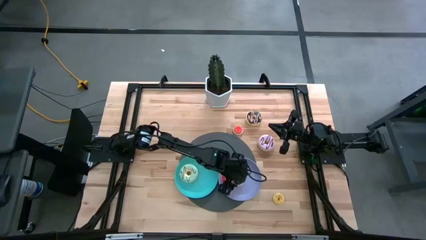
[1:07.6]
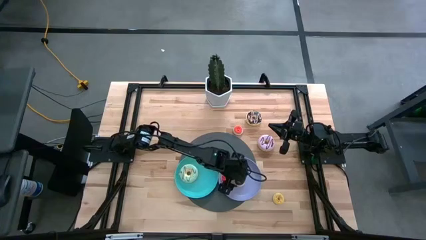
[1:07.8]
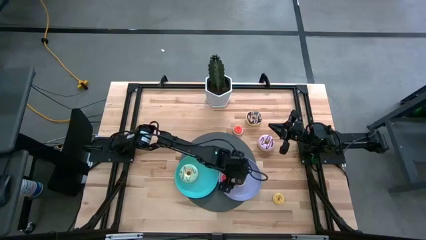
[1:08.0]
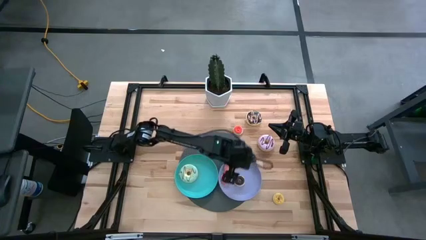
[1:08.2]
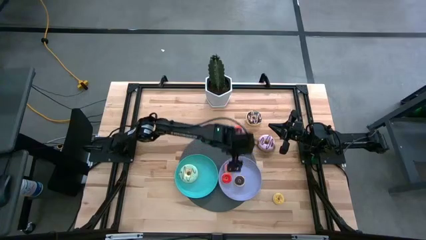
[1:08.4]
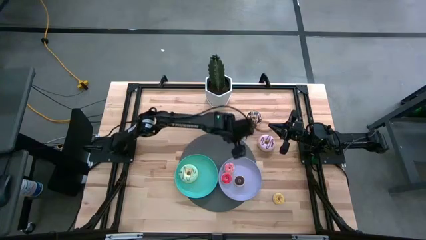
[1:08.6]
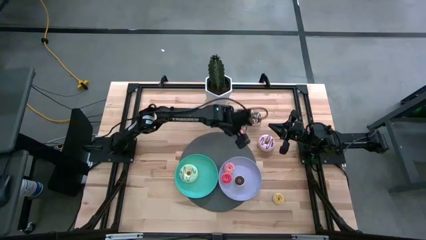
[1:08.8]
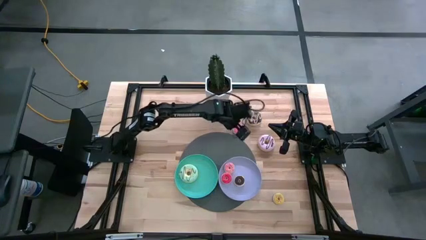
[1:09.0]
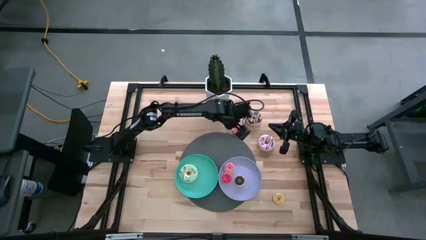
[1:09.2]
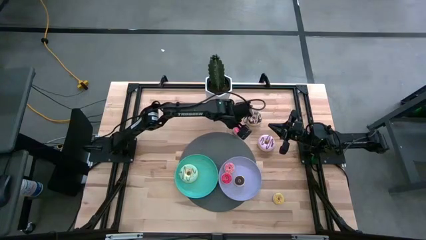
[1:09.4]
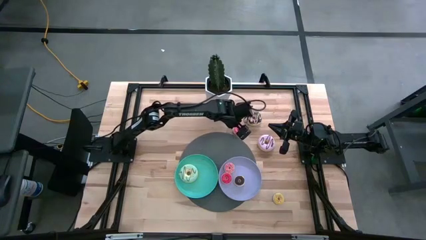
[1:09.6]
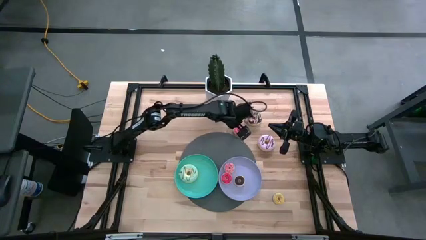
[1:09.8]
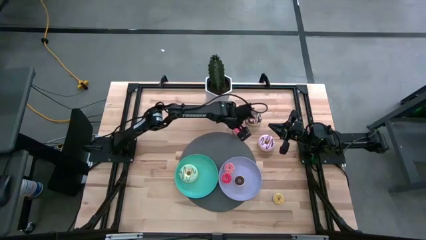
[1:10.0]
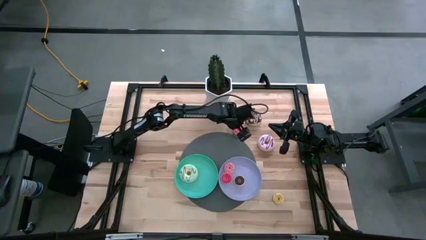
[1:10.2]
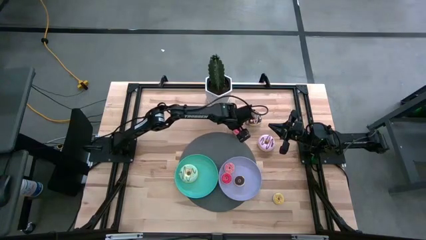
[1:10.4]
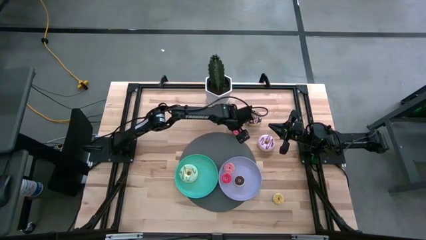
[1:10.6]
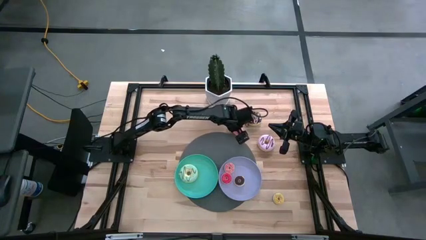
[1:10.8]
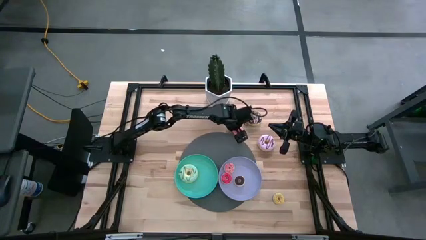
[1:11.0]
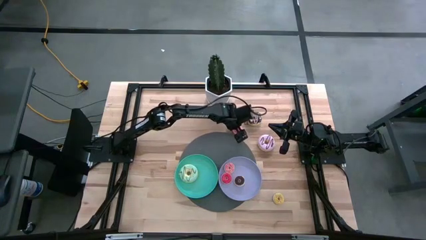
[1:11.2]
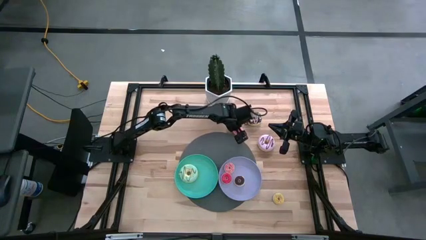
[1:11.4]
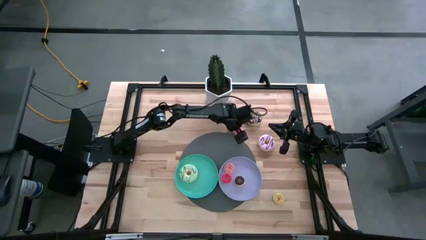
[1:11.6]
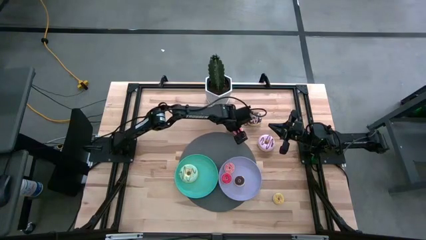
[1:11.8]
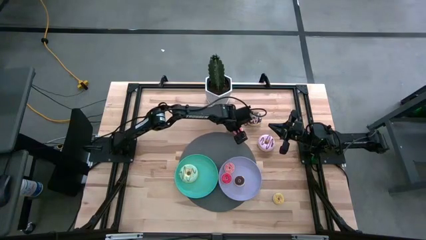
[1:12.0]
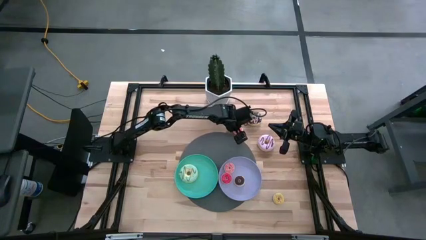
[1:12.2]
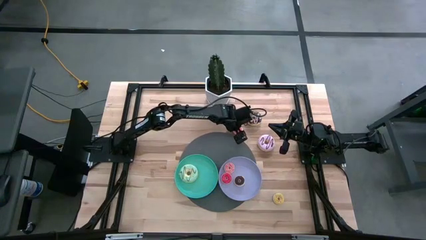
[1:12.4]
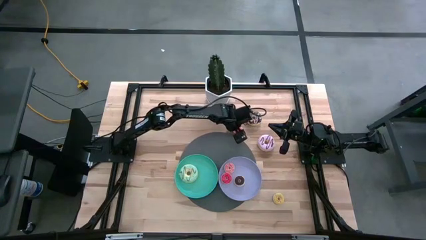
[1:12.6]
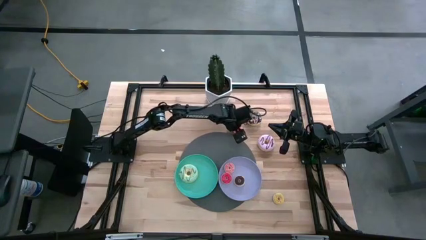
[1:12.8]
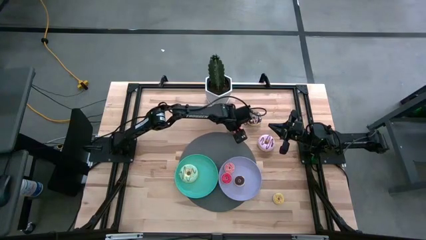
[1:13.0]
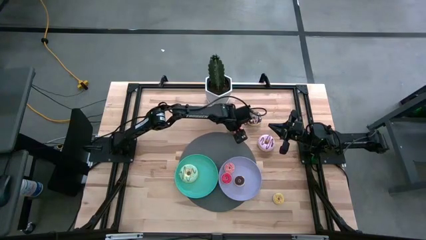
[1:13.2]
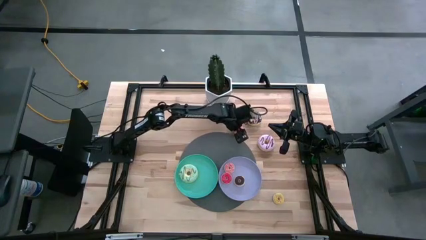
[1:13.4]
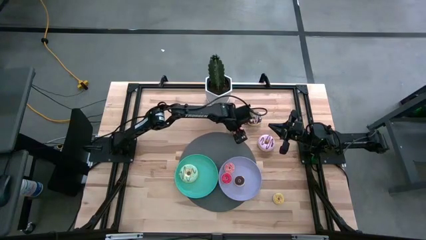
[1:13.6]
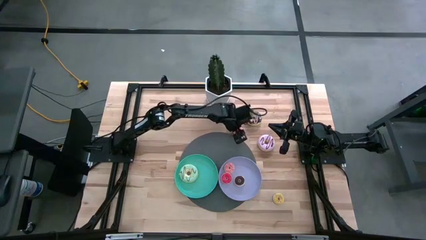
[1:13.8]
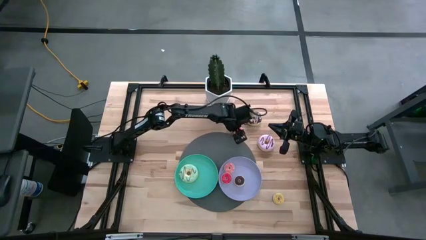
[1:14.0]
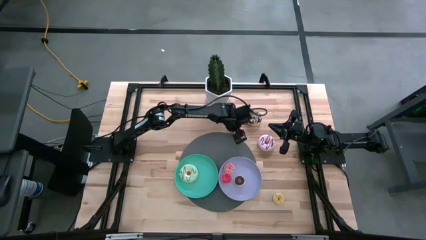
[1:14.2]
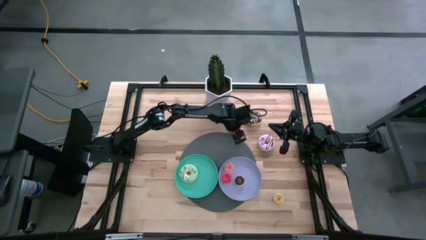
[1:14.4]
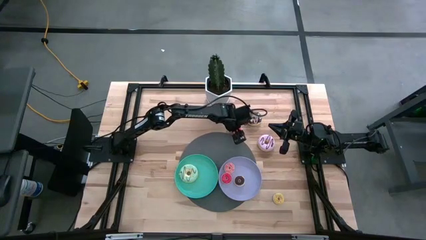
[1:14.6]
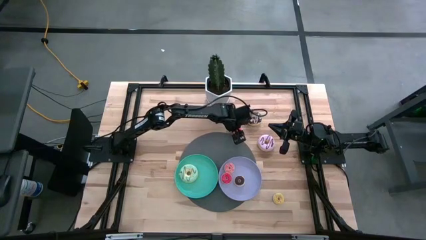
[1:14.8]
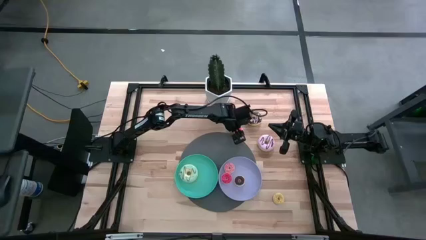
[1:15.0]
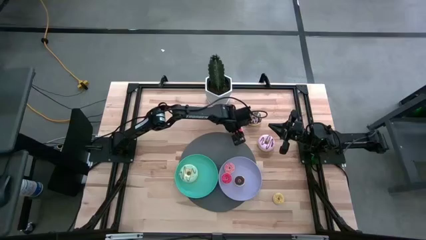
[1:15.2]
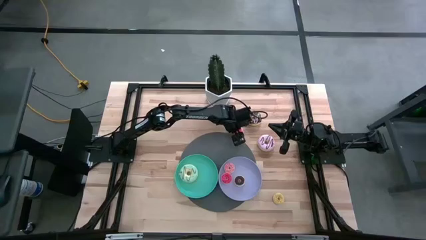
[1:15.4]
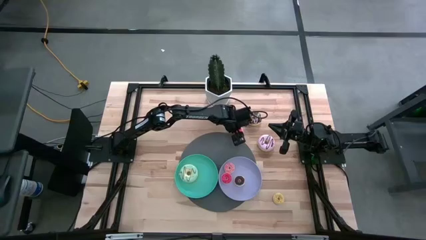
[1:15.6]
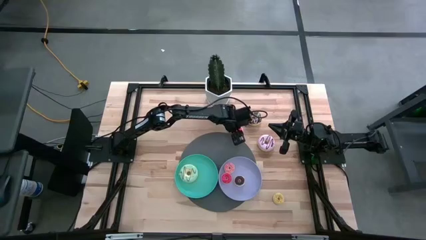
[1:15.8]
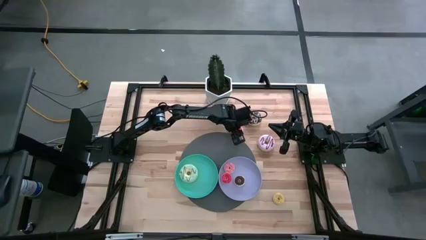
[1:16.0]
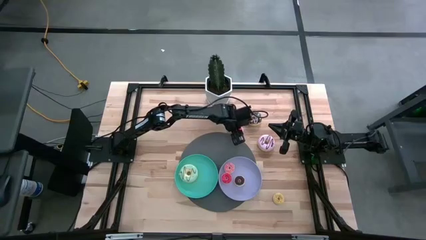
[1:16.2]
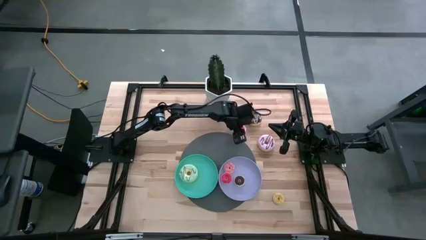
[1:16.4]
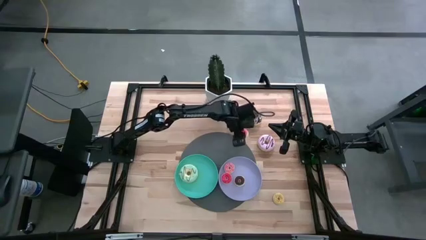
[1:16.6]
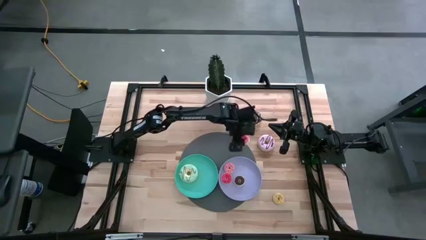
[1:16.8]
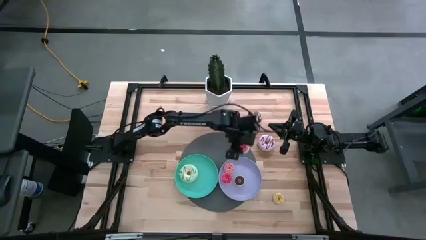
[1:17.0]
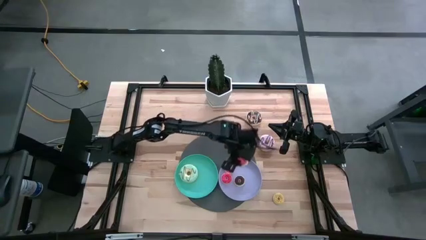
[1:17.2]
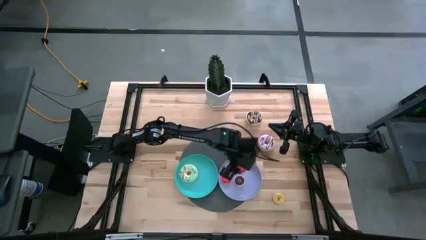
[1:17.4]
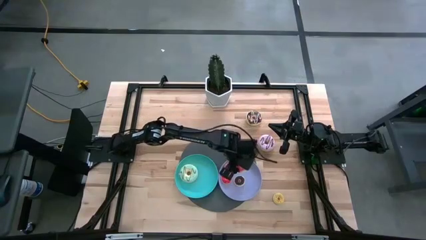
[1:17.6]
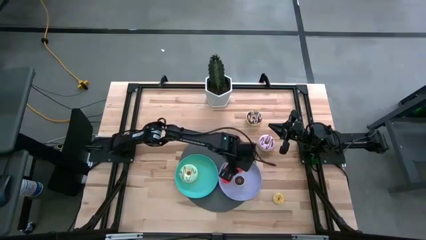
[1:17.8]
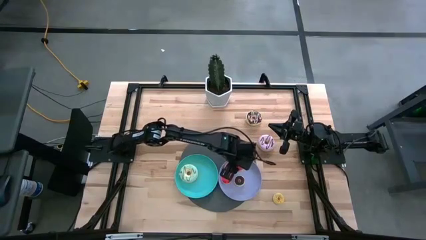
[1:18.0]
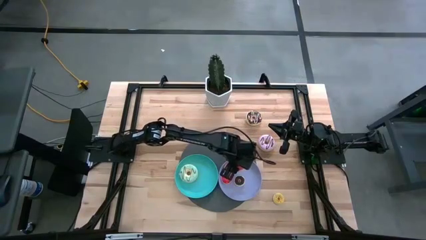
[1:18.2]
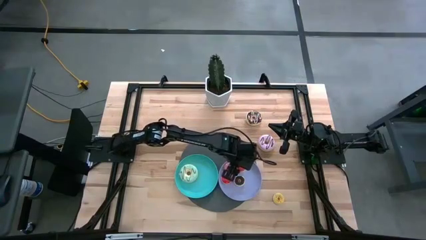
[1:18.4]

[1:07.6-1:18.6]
Task: Pick & Place donuts
Put the small orange donut on the purple plate

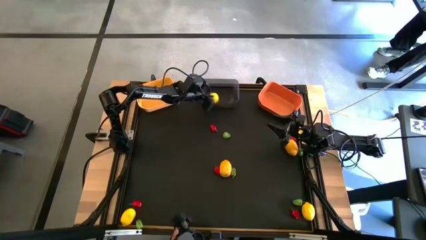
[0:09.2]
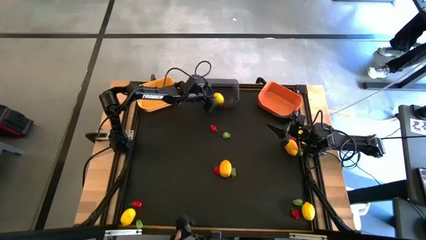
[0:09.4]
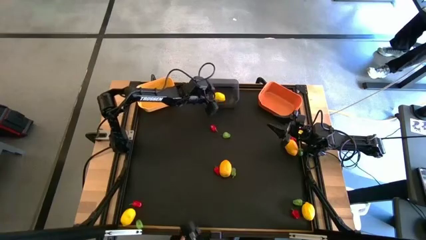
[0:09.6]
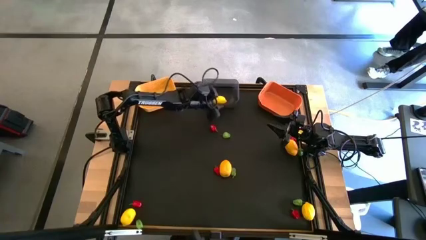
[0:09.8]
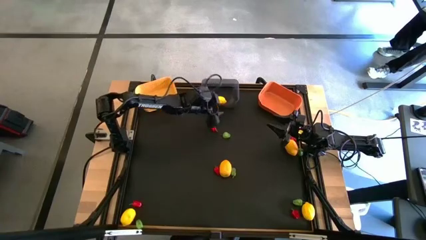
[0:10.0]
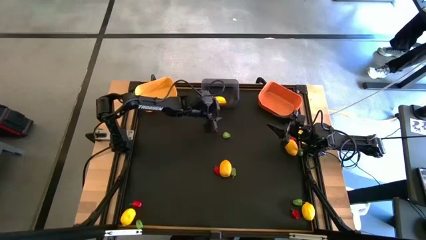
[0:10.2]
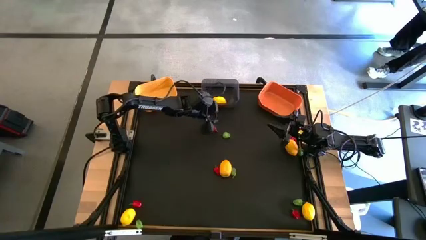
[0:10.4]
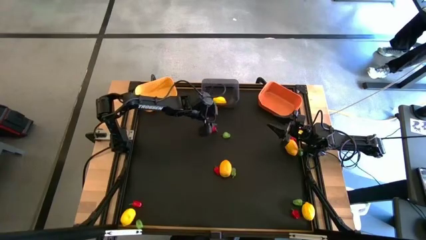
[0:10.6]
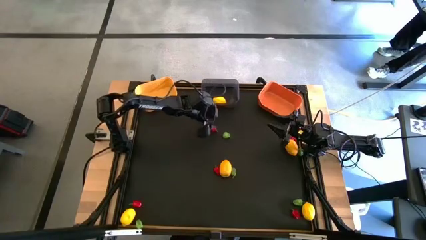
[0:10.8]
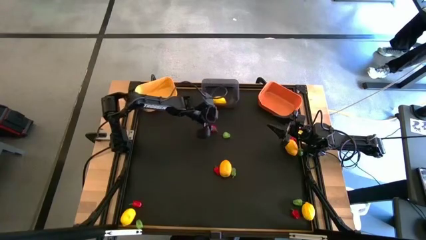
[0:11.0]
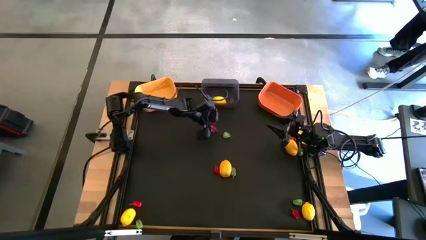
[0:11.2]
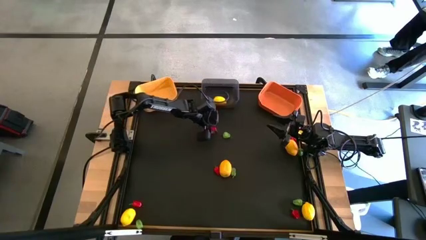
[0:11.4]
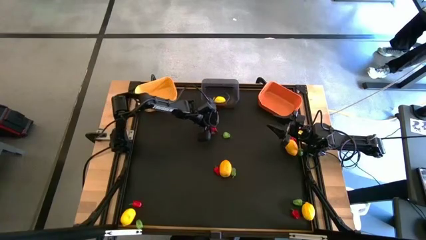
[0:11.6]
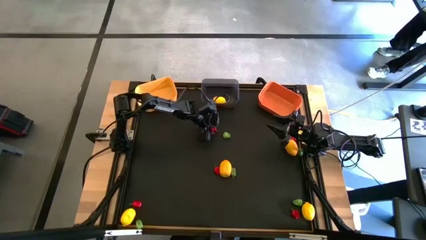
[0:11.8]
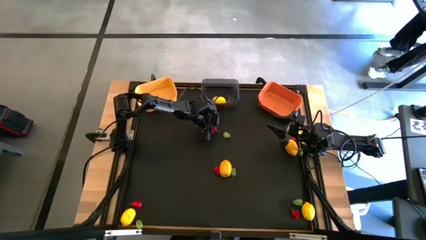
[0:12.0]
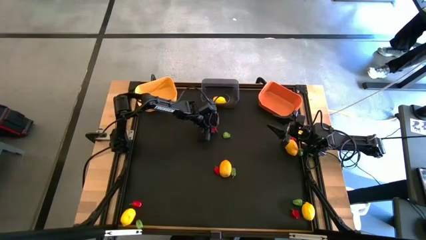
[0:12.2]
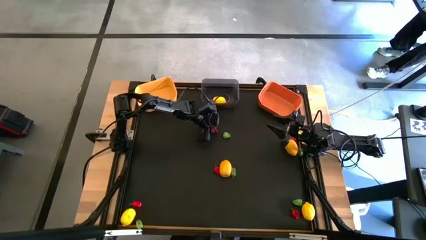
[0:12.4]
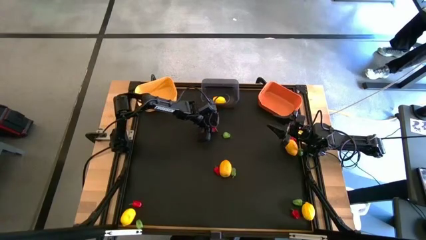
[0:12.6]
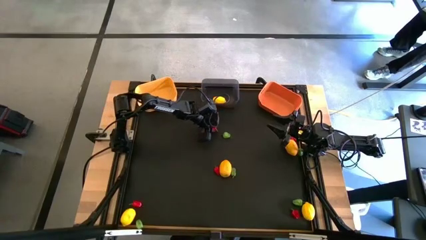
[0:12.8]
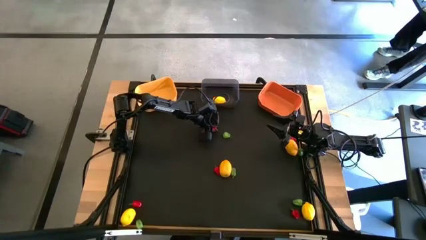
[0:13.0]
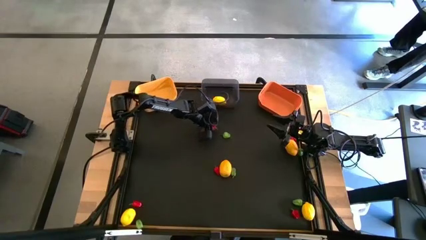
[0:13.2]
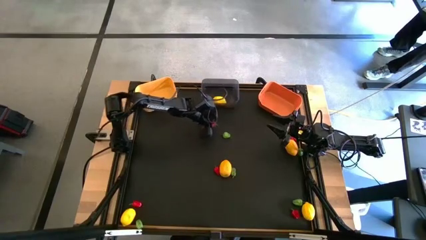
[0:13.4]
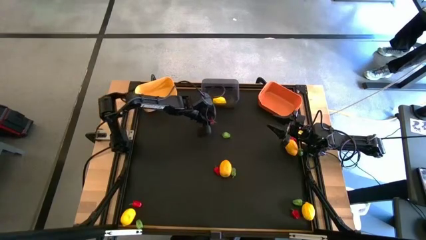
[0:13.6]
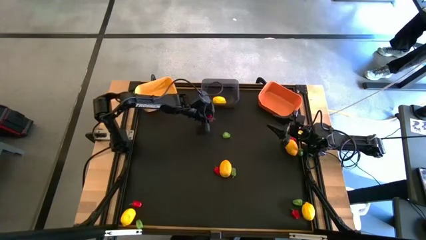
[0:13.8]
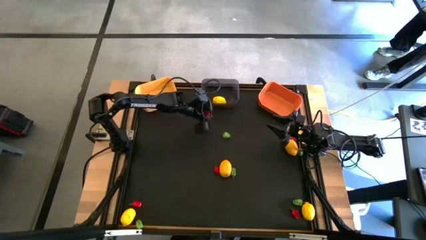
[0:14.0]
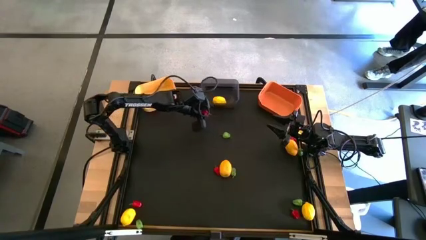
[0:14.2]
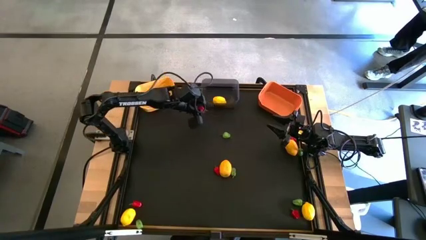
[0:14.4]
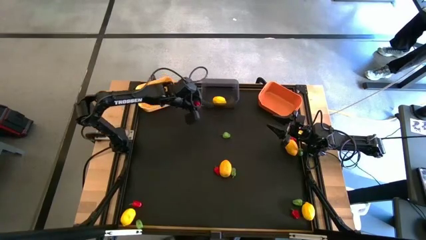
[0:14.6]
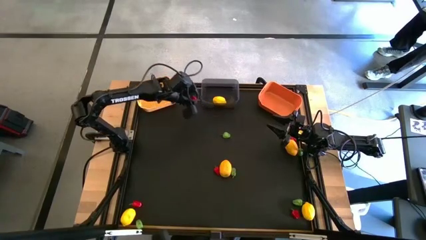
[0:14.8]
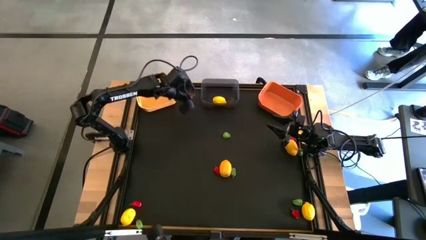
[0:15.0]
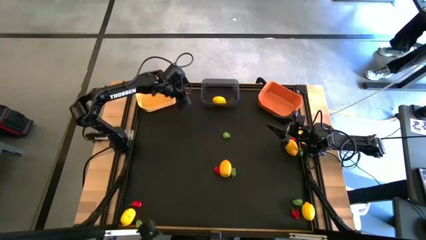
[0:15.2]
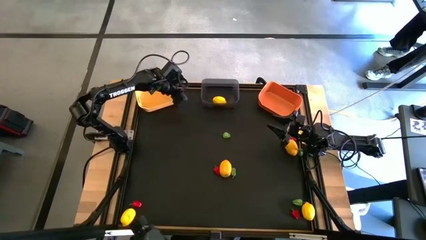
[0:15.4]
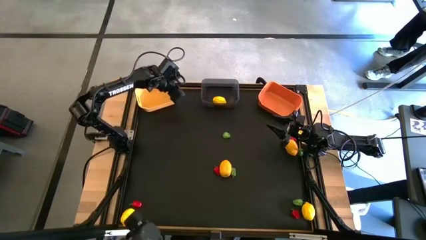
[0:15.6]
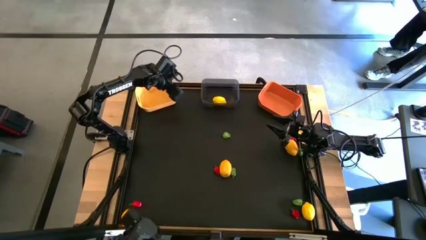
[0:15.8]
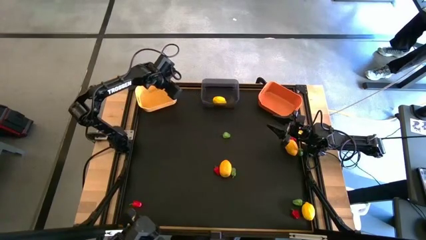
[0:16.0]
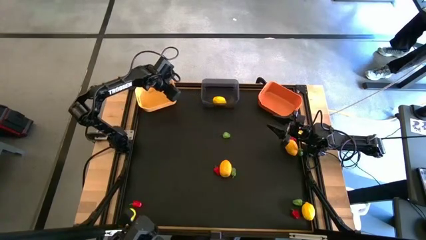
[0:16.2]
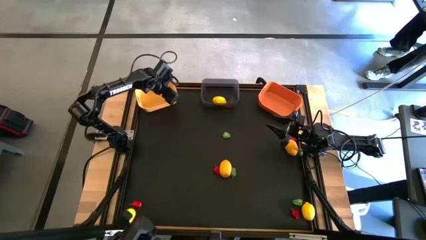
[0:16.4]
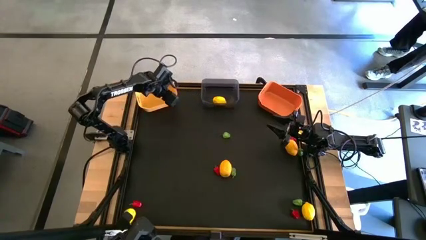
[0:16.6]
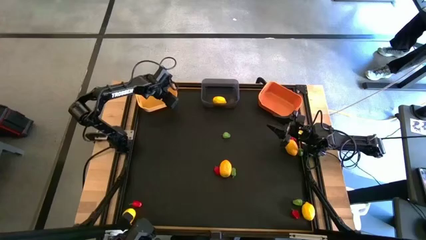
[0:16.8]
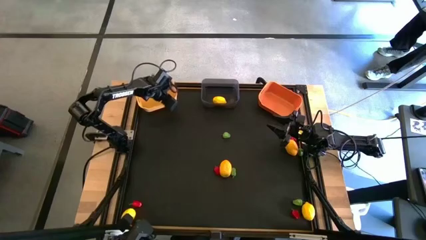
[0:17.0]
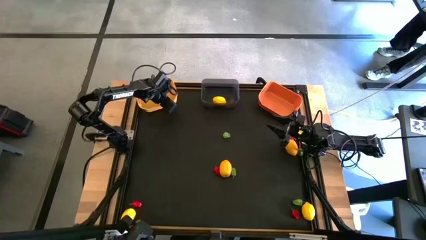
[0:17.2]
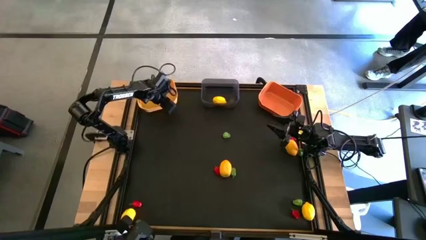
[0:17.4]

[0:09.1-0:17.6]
Task: Sort produce into baskets
Put the red chili pepper into the yellow bin
